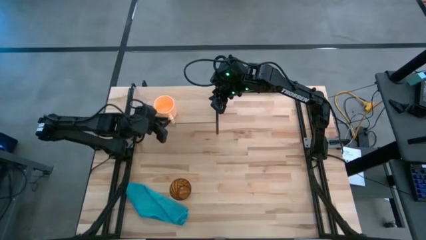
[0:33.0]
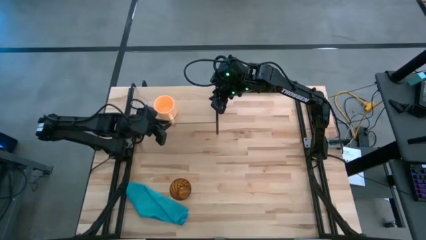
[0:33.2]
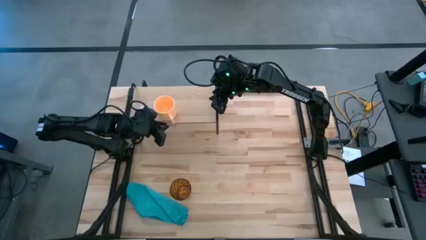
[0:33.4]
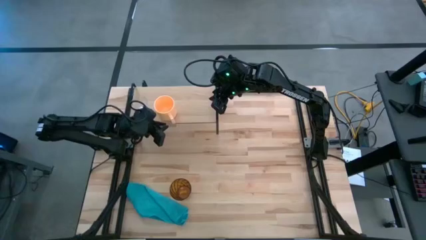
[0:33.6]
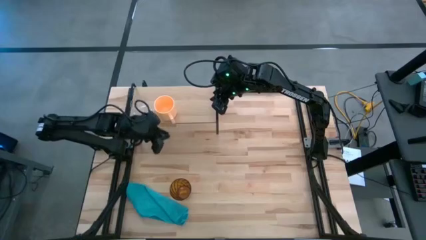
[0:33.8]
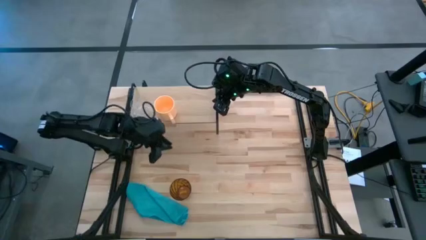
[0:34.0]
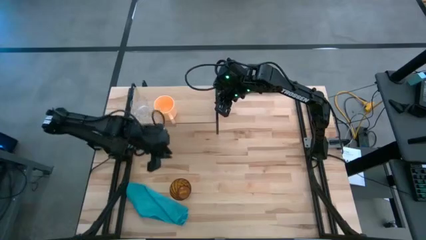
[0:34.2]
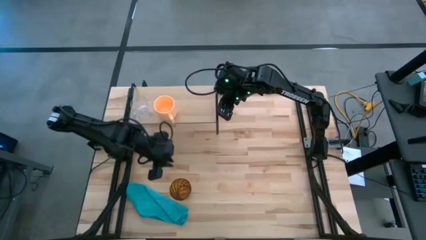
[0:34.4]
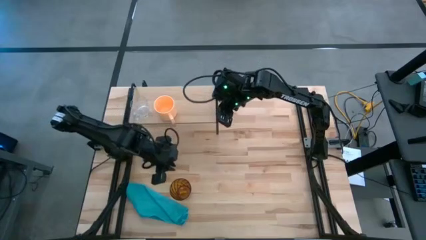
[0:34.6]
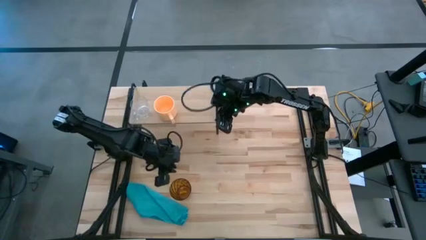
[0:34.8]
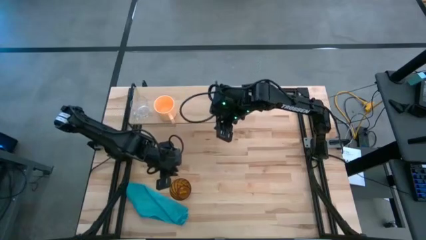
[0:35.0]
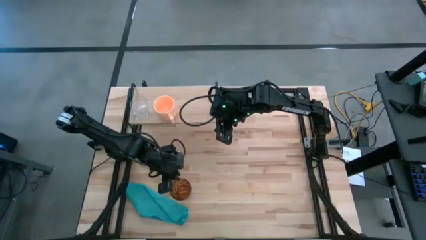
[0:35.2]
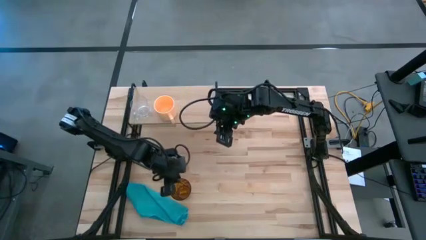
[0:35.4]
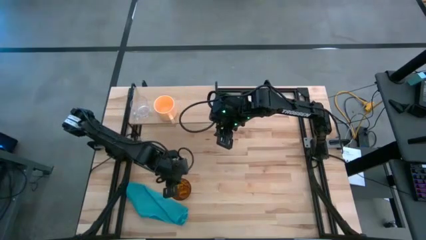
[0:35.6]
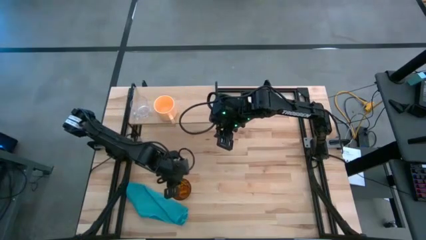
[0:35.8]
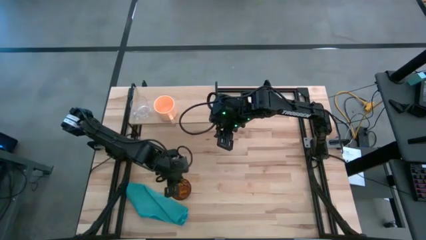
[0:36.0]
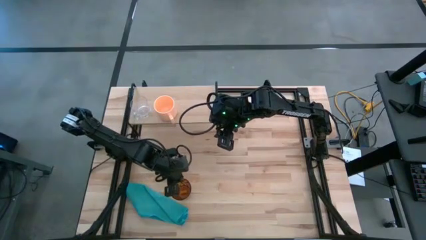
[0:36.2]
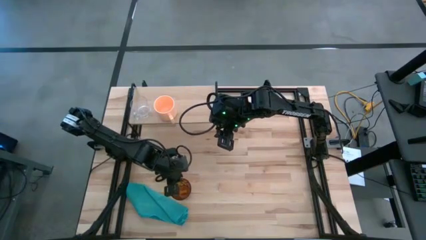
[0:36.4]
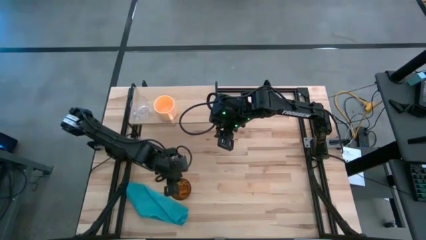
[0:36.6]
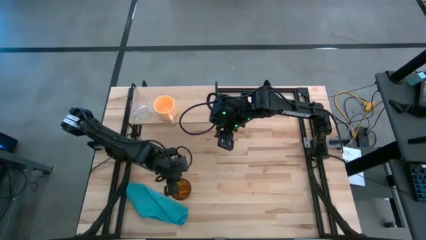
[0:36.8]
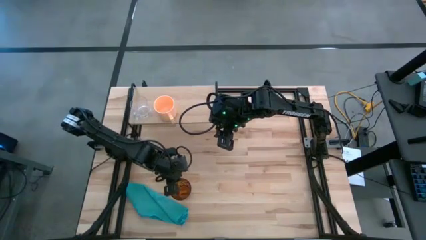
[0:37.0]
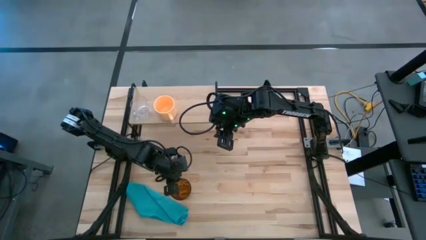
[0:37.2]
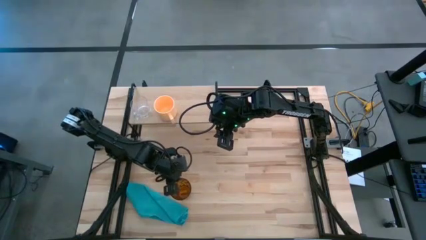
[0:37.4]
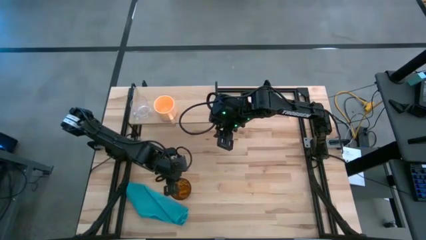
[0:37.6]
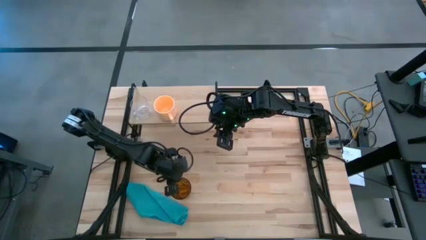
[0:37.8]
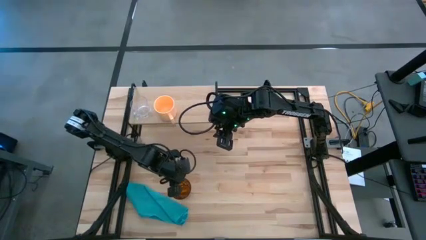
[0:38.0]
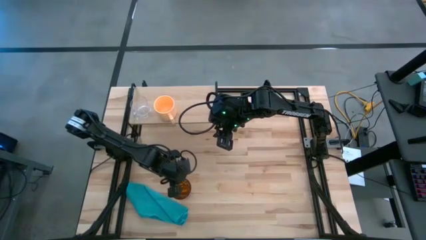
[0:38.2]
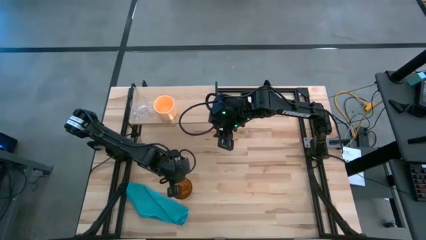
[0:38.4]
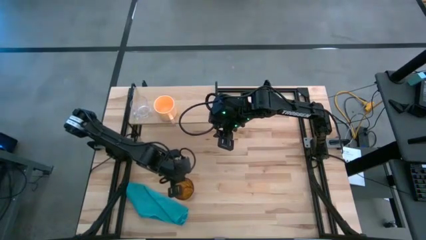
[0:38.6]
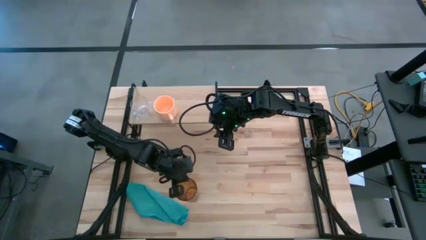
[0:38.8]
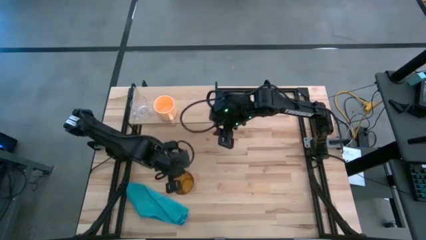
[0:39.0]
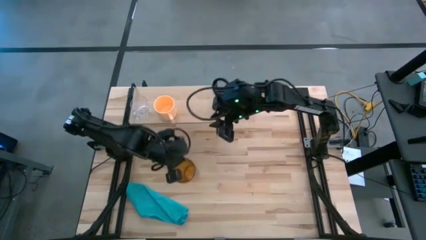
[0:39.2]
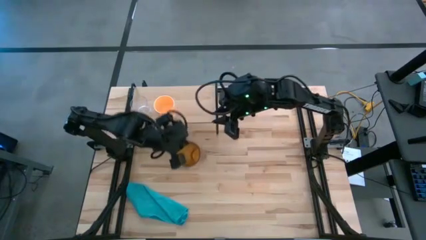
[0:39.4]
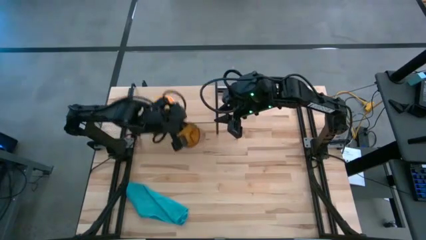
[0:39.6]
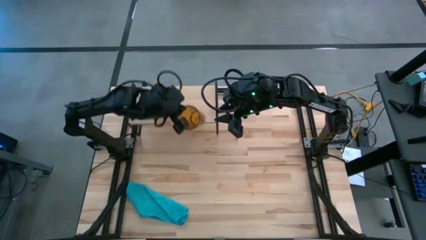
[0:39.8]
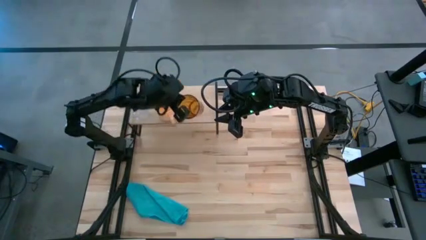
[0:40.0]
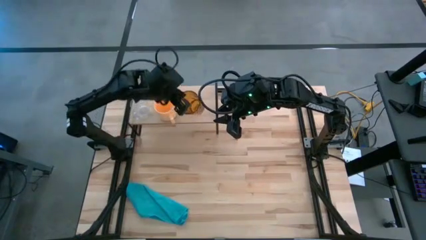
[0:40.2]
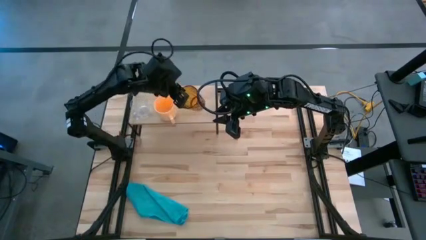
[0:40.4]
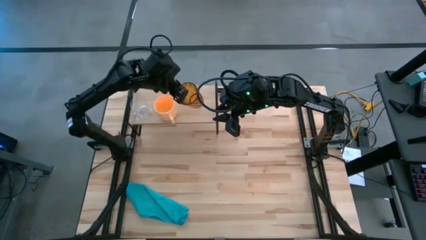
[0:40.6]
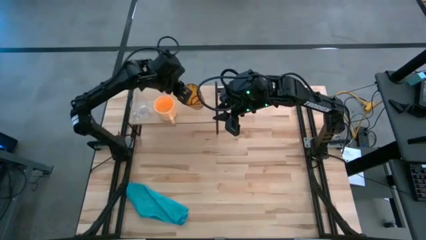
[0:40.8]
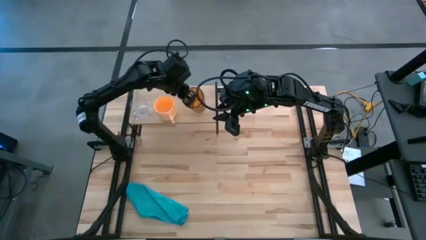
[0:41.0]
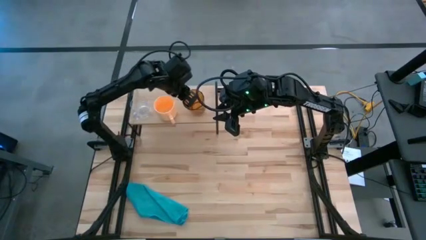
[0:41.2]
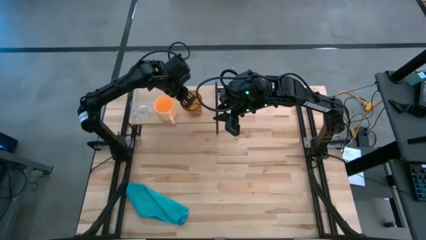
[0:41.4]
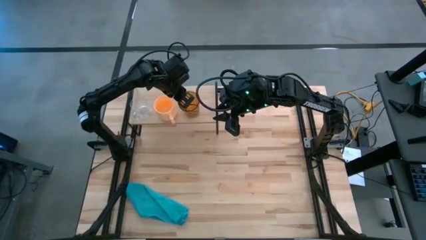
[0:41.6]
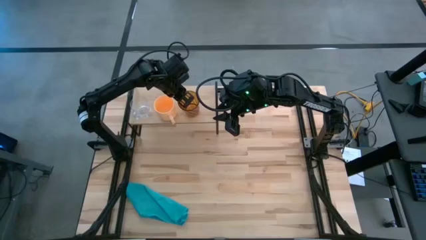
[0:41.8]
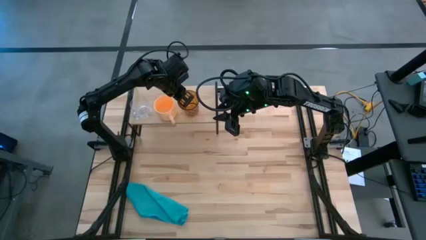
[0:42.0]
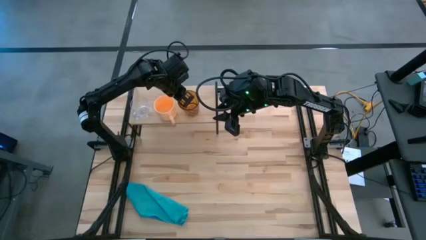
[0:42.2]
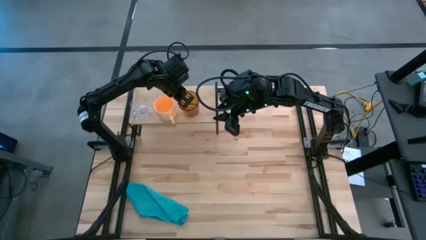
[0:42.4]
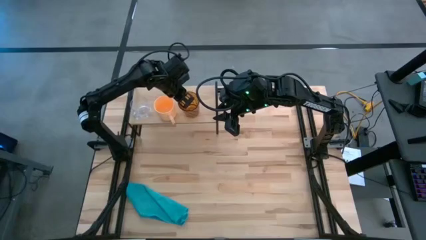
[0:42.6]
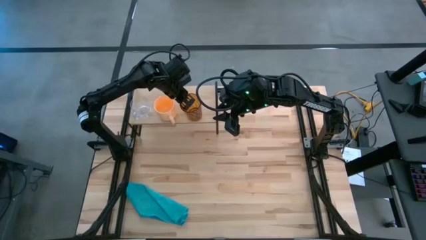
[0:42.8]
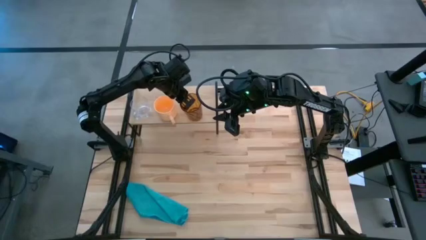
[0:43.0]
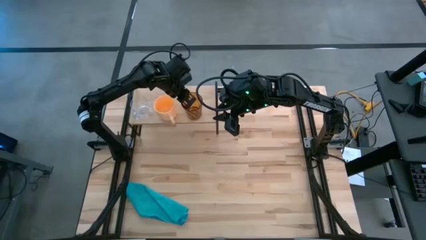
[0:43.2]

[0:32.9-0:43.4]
Task: Stack small to large cups/mugs on shelf
Put the brown cup on the shelf

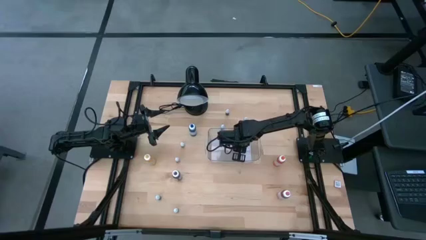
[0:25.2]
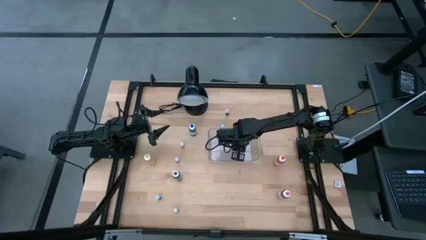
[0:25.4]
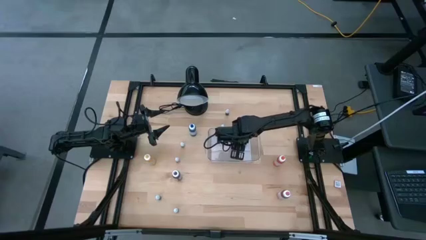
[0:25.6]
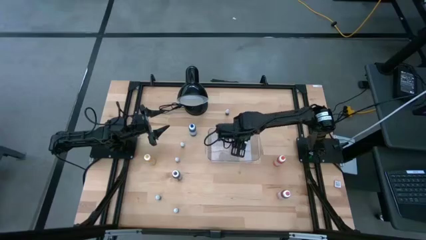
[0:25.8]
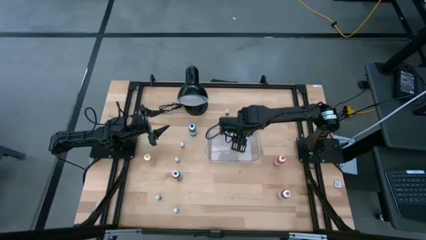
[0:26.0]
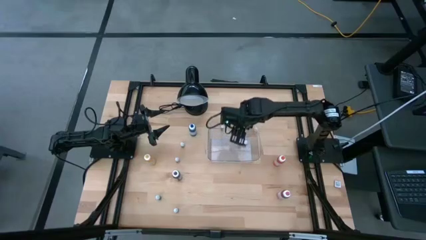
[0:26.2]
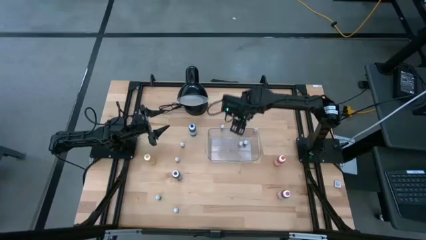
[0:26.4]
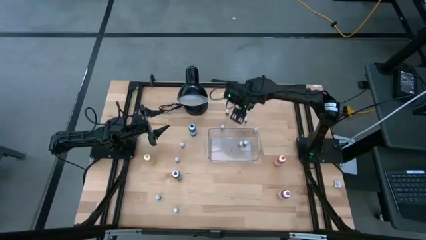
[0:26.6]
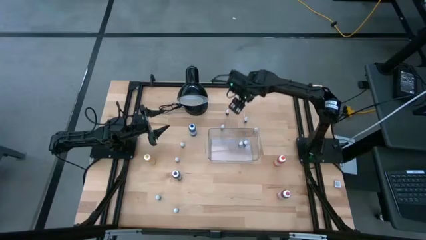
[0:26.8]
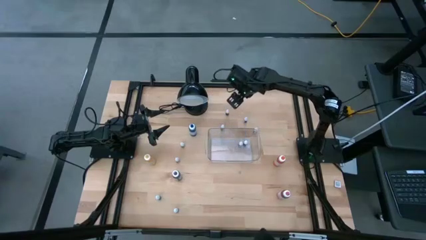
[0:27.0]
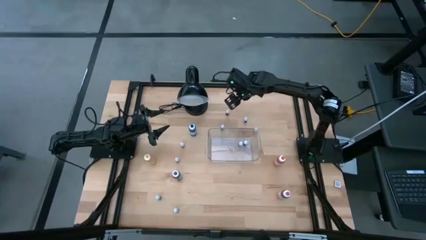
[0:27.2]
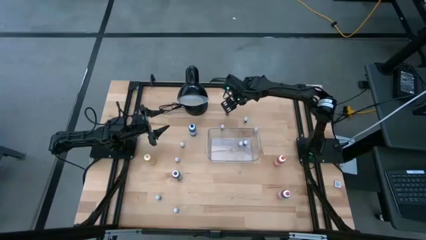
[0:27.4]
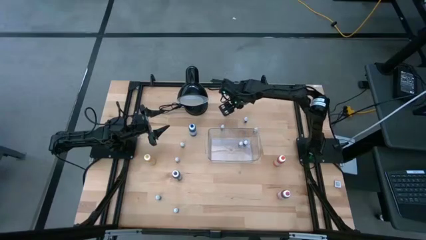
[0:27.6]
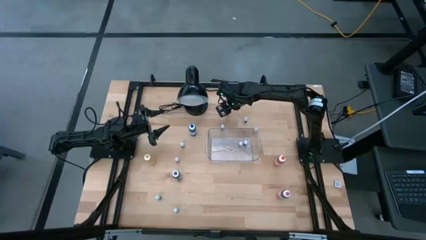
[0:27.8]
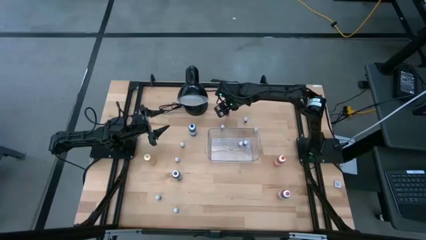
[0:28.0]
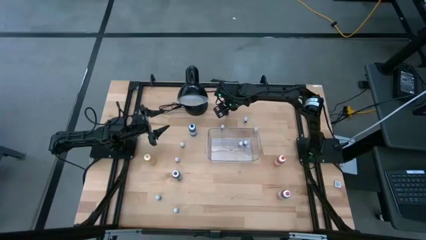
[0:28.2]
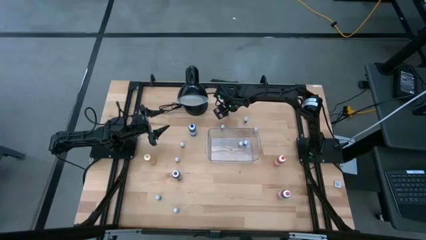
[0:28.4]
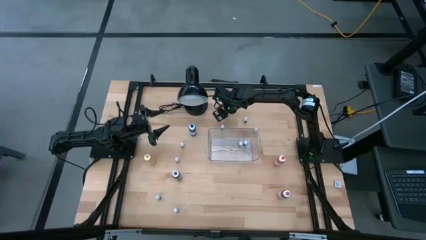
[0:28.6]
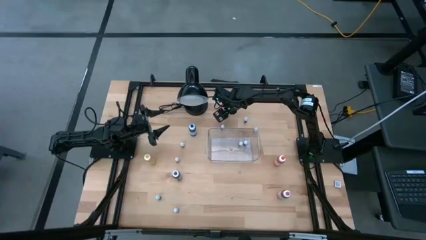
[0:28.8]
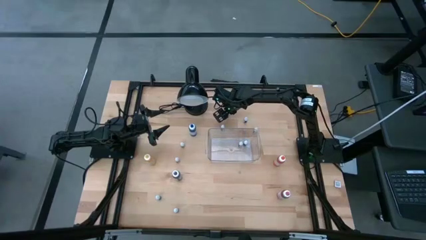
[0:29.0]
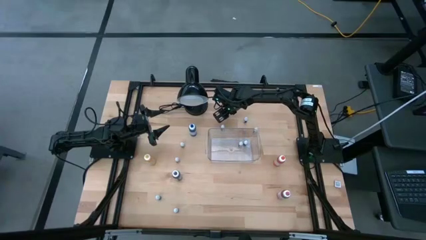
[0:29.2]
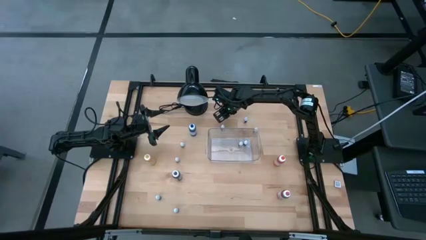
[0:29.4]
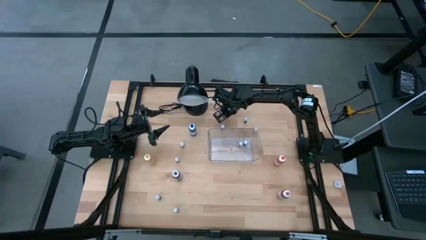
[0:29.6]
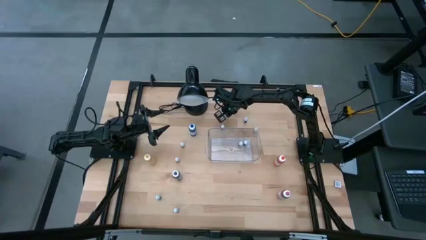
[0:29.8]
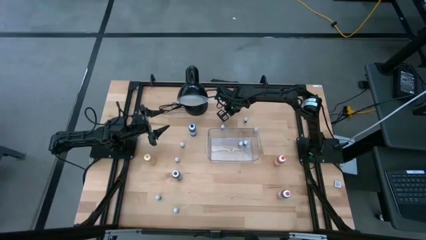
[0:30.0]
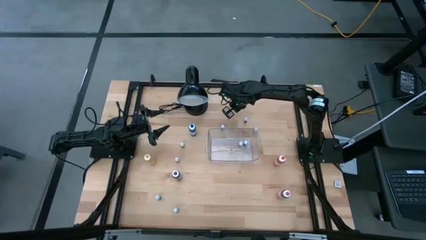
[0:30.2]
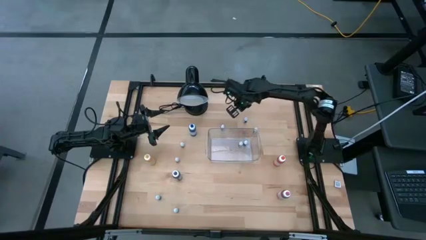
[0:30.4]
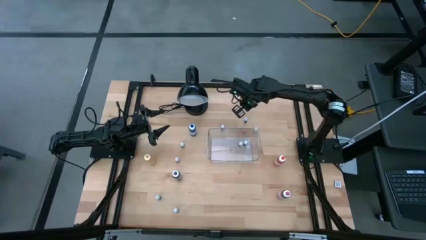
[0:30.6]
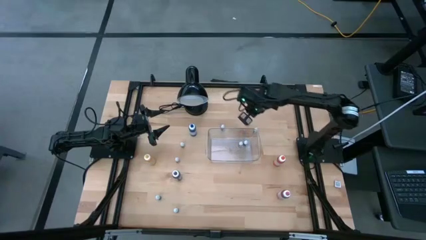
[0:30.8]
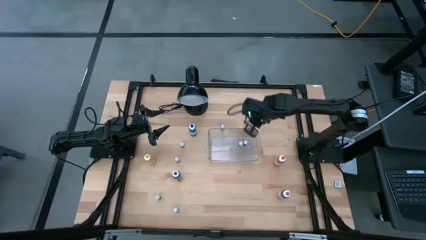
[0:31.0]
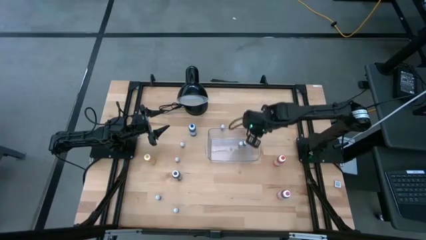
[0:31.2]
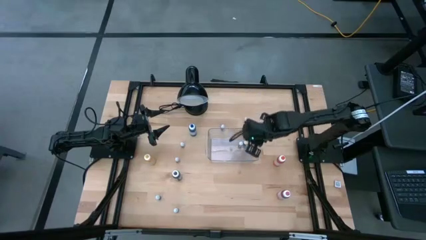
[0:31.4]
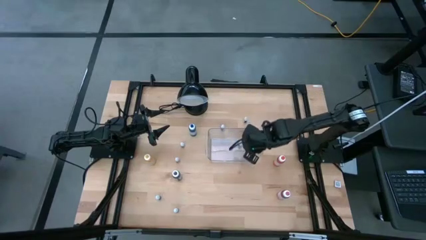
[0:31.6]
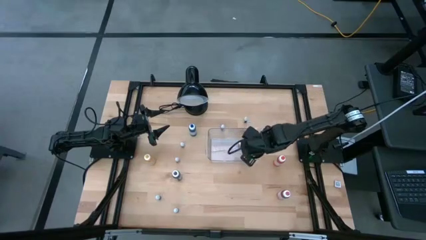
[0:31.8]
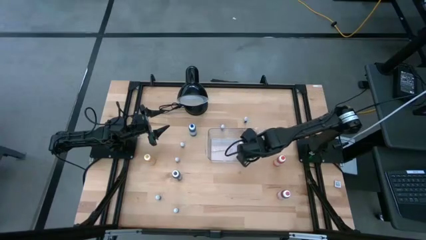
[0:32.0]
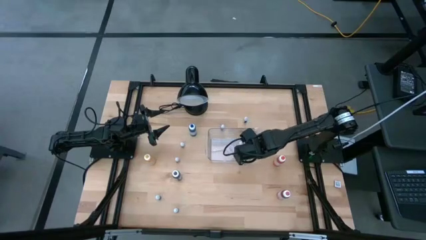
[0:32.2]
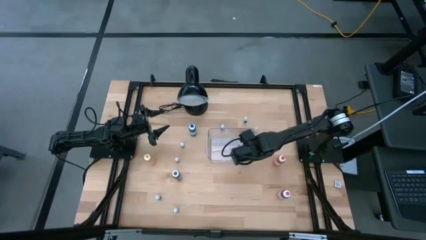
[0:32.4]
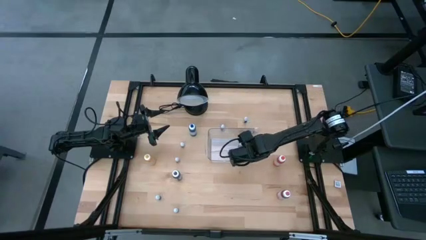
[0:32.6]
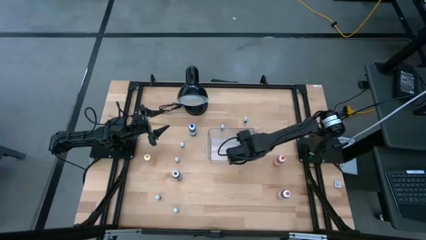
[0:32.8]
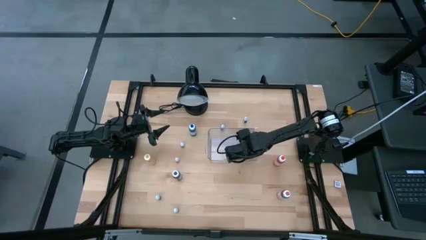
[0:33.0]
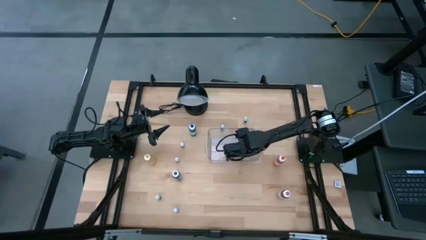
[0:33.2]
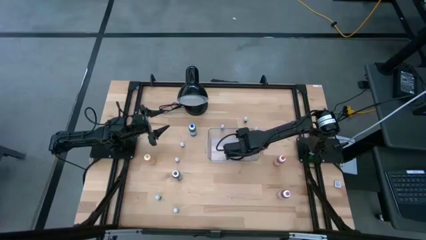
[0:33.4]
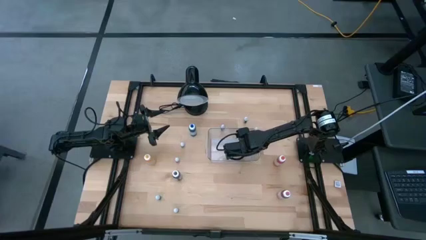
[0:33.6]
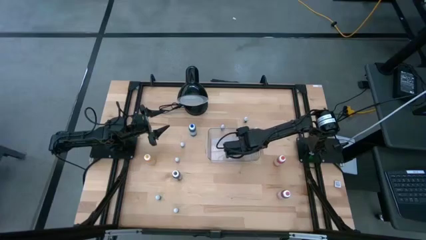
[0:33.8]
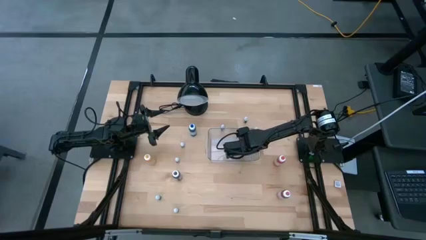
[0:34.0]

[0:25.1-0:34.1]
Task: Pick & Place food coloring
Put the small orange food coloring bottle into the transparent bin
